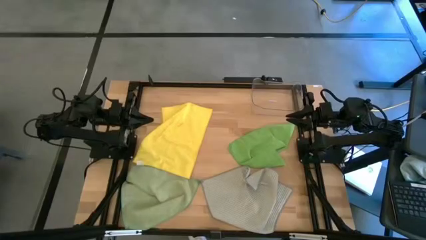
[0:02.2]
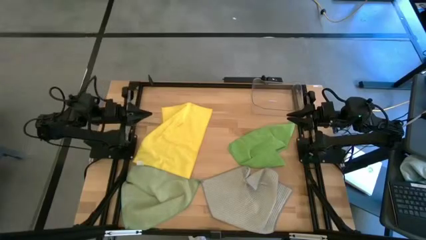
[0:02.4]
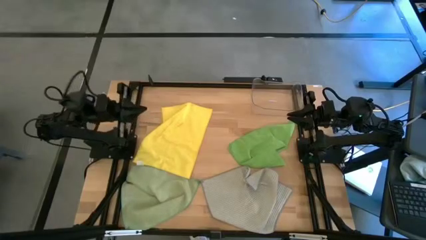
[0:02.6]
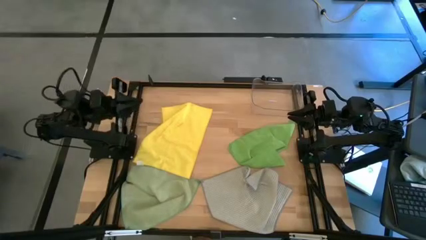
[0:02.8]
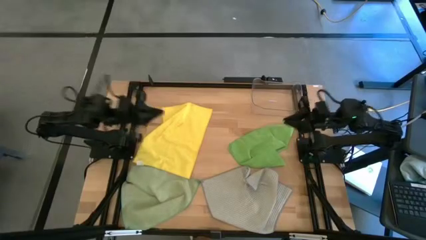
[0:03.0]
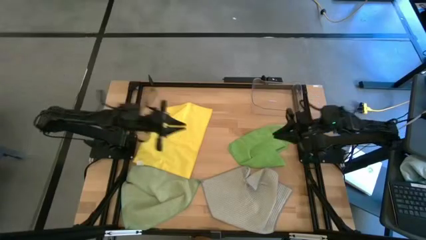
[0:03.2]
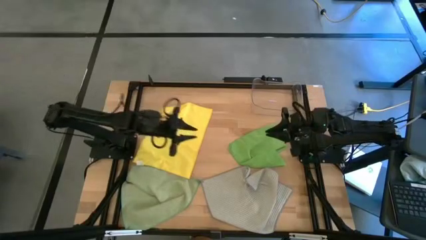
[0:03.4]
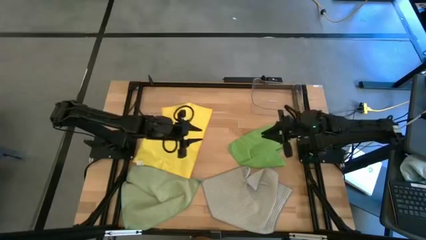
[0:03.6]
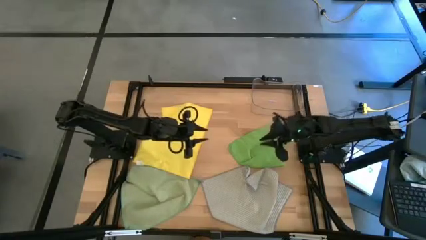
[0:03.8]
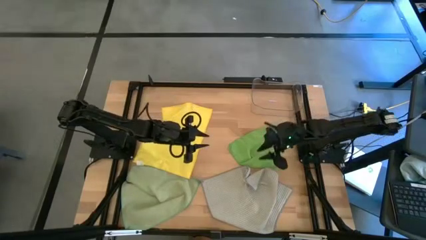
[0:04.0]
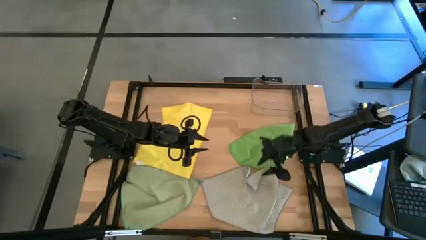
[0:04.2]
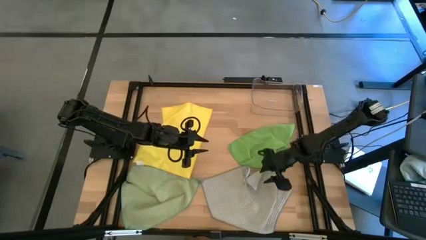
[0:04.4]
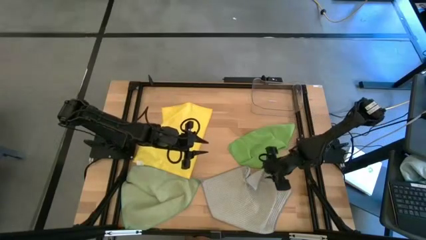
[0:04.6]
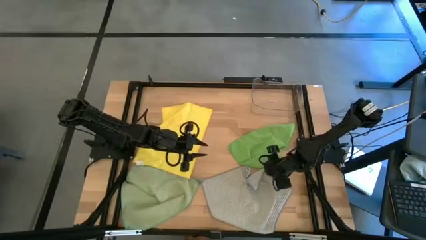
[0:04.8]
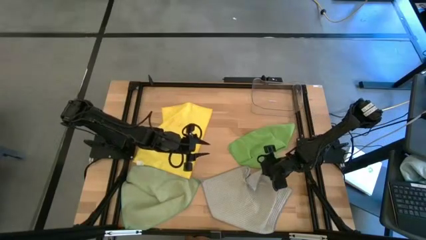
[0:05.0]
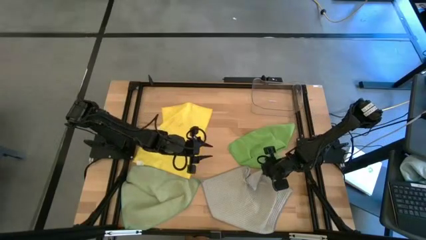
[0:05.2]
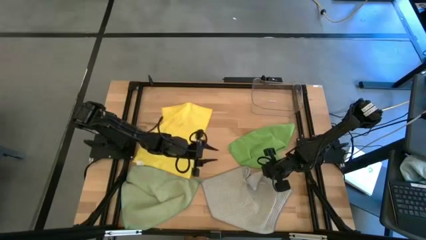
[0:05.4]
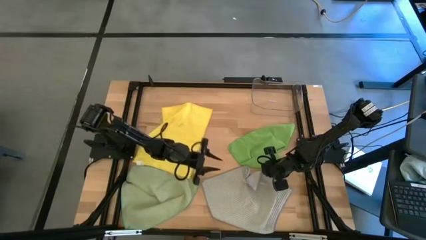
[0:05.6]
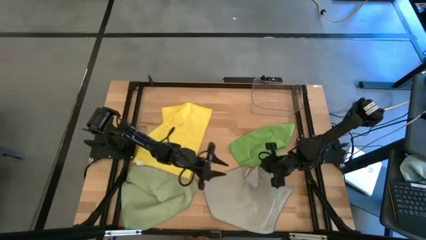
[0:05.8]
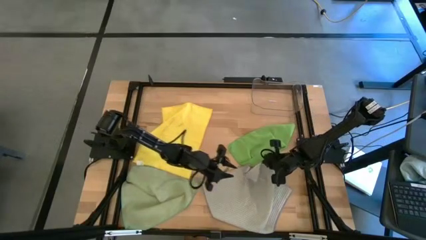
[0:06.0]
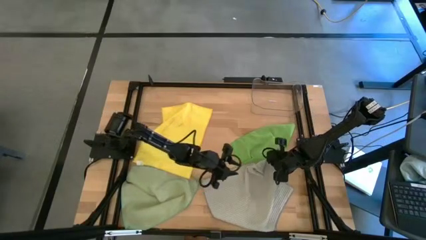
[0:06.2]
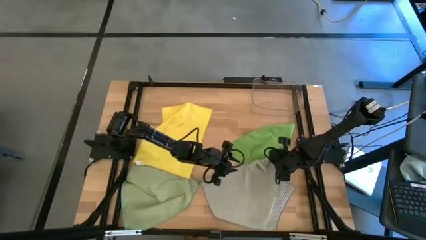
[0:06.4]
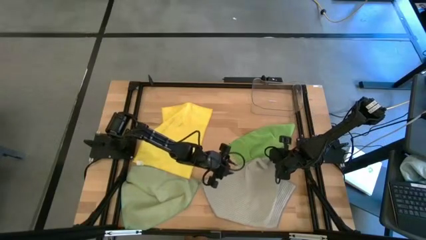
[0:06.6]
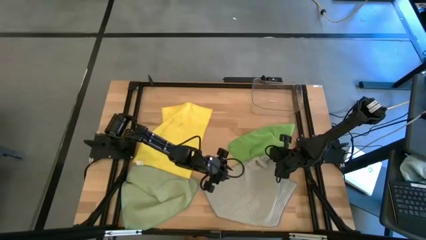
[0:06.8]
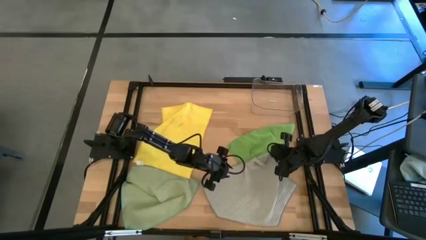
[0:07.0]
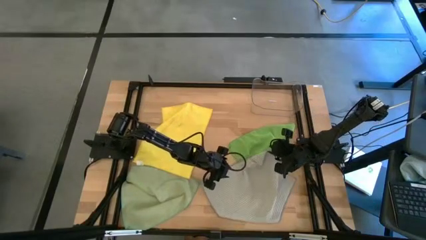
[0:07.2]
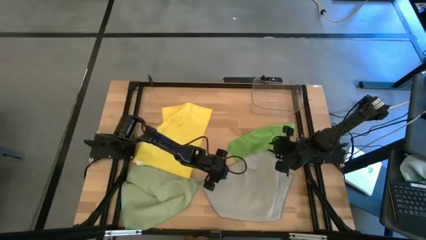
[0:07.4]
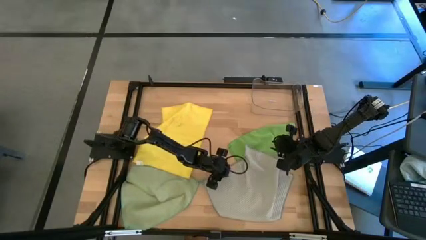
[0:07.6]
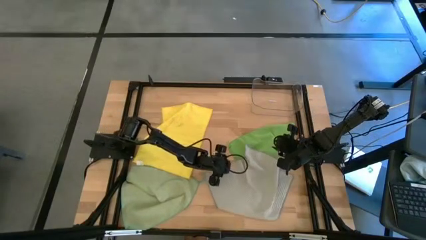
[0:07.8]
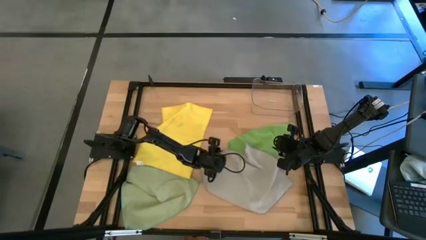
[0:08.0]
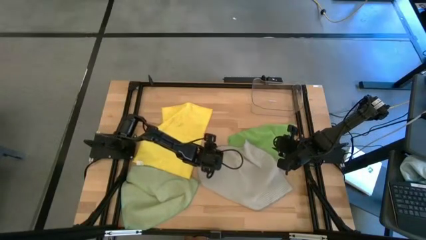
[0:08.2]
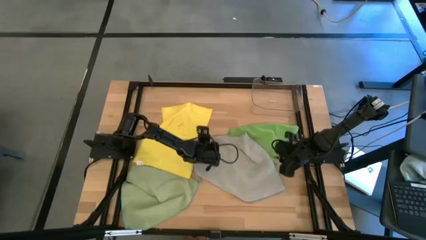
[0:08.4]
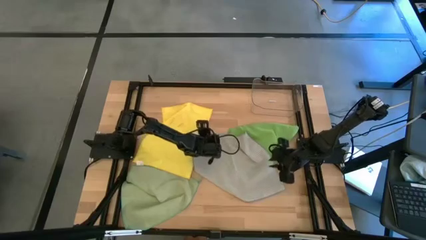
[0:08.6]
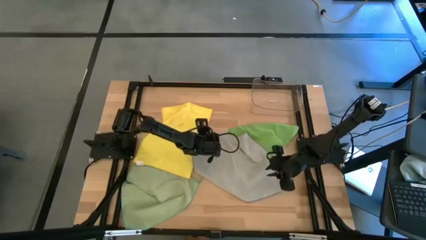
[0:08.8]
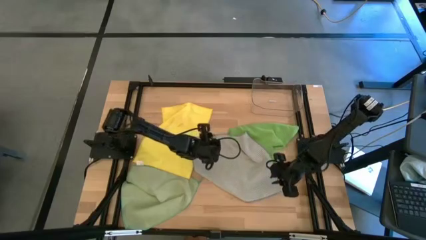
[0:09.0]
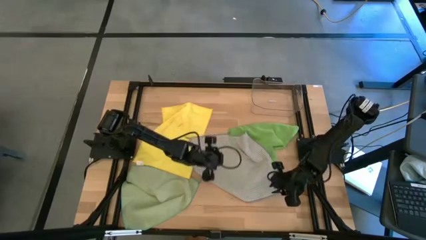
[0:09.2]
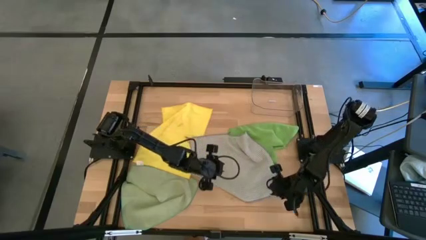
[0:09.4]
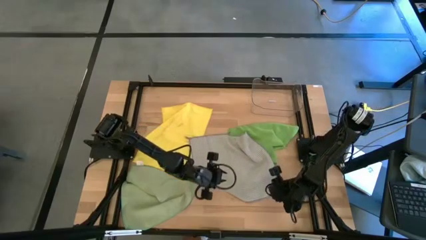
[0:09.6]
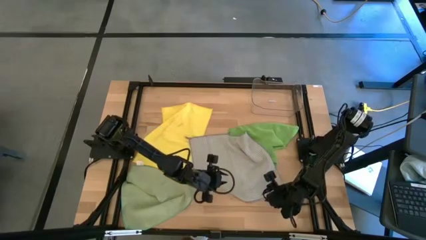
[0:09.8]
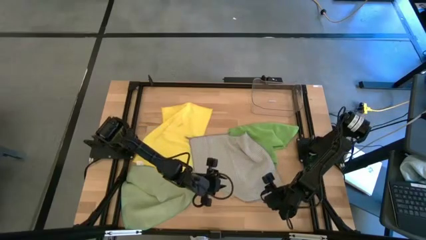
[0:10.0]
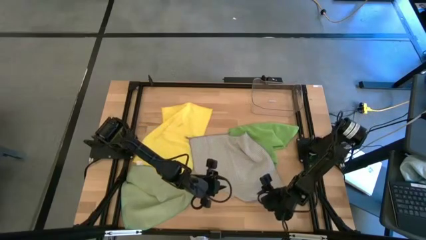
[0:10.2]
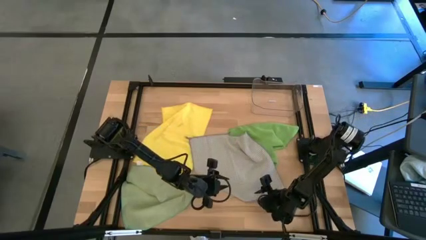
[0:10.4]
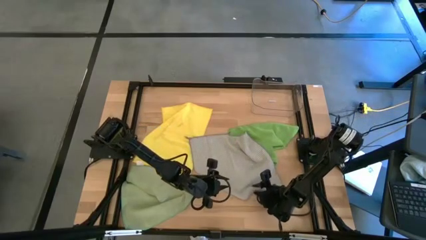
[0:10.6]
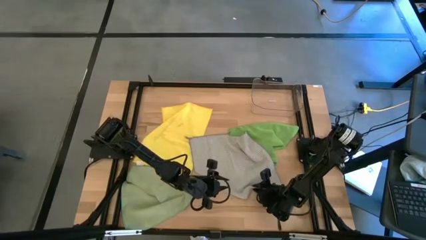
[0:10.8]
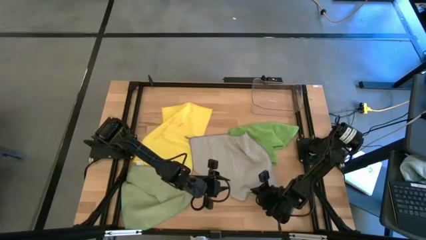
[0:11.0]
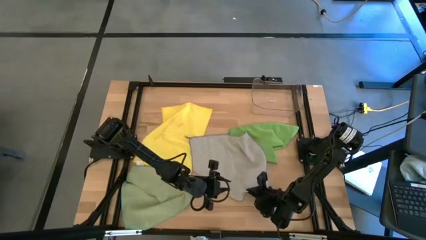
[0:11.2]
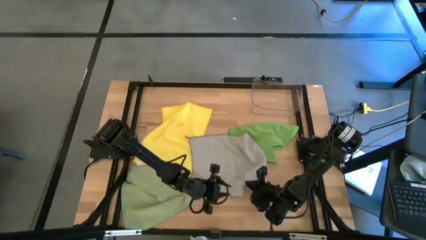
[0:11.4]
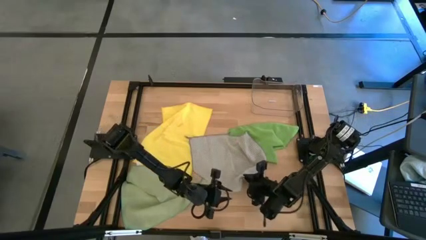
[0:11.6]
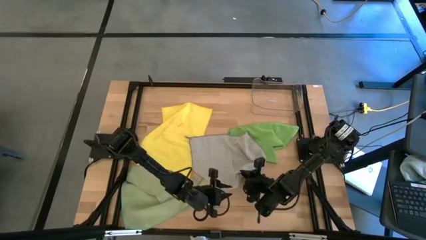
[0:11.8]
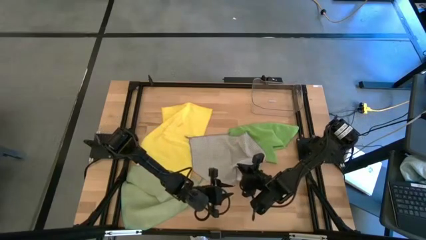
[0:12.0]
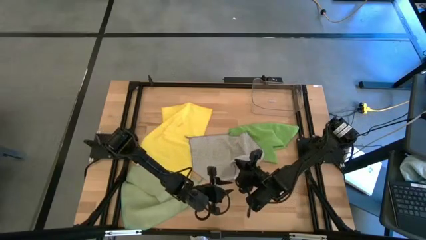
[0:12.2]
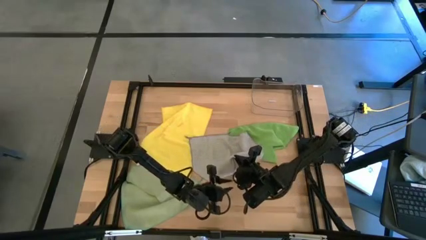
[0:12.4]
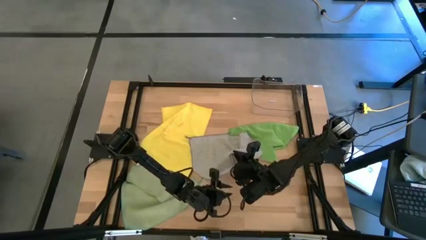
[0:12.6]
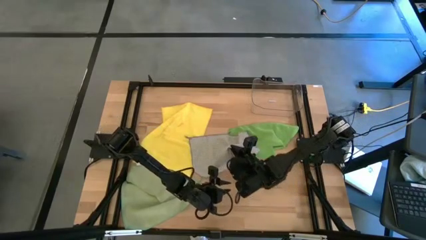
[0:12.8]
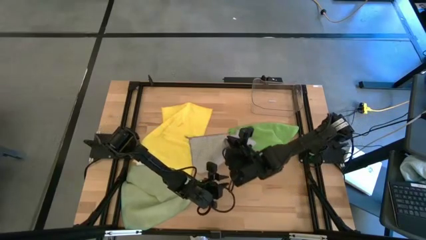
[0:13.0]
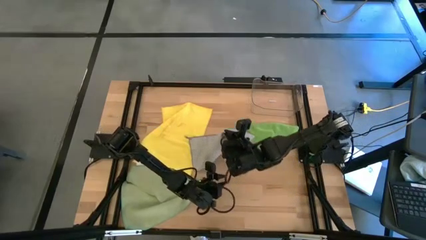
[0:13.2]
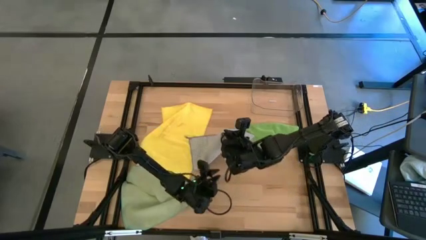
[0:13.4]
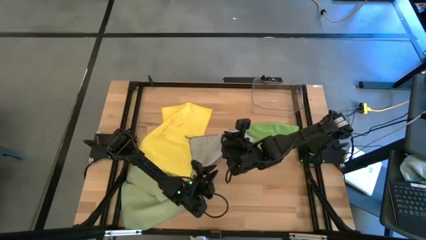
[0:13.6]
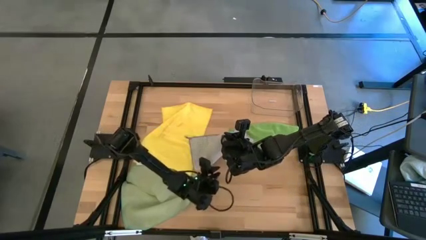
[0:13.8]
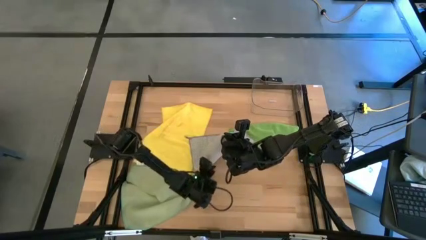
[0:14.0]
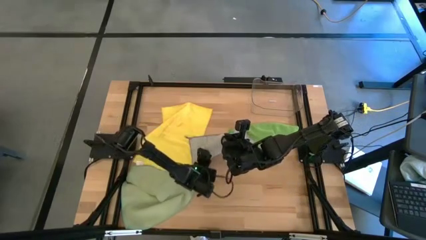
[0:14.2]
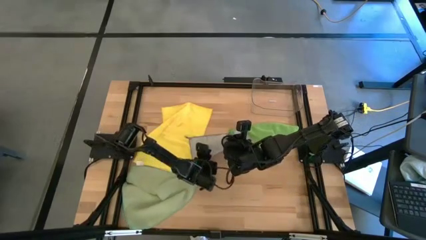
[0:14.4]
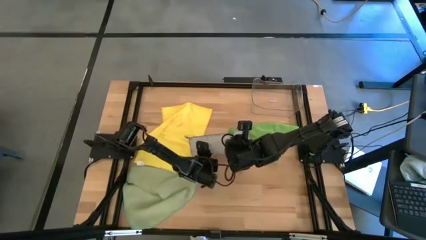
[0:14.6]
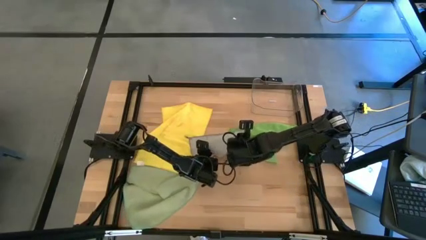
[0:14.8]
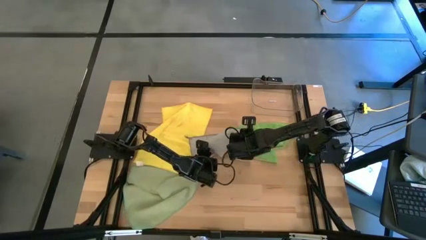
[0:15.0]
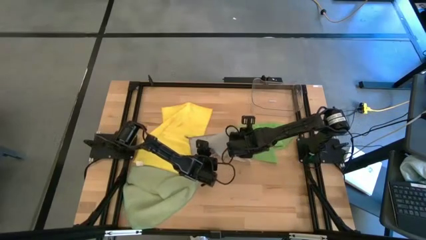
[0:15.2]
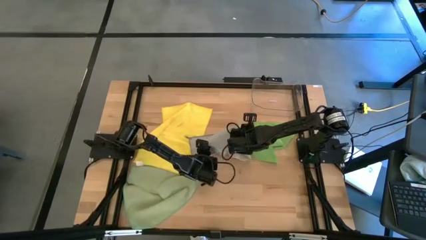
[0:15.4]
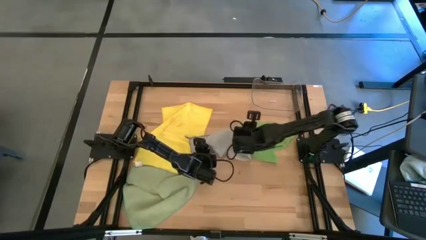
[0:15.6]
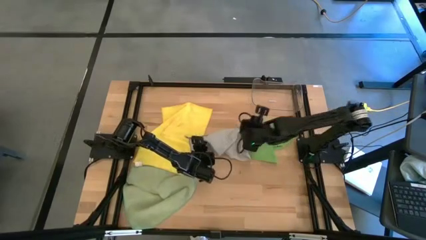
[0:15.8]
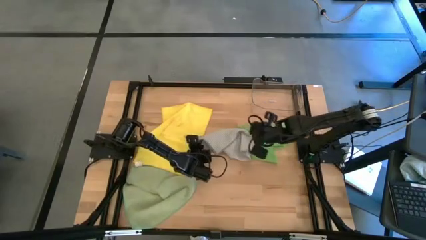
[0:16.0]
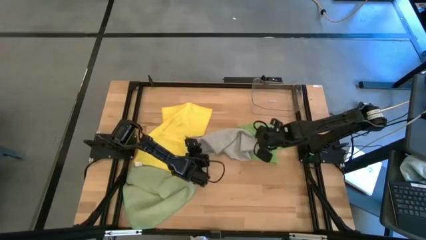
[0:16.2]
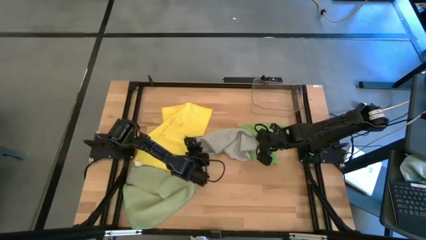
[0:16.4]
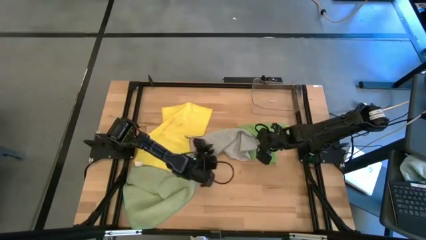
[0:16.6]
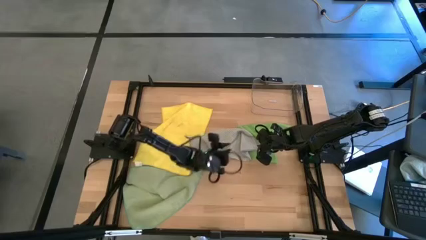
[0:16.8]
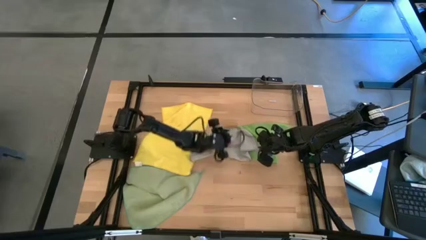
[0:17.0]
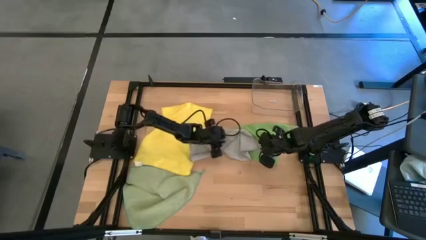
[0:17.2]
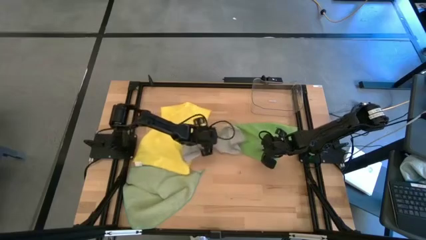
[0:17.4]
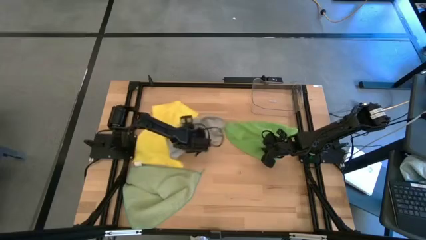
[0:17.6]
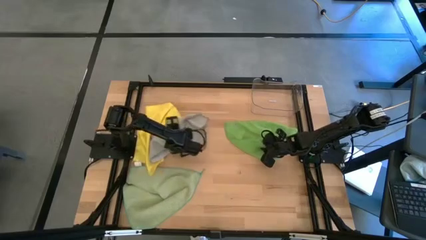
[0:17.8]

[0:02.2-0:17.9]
Task: Fold microfiber towels
Adjust the gray cloth

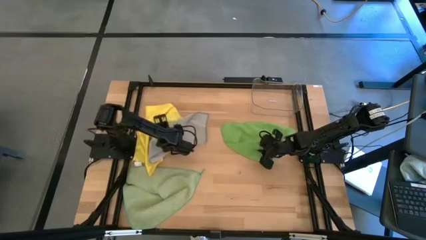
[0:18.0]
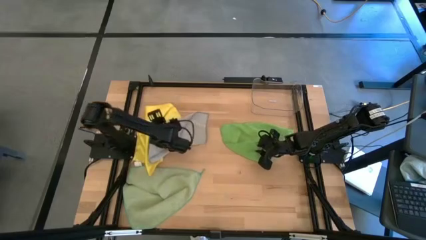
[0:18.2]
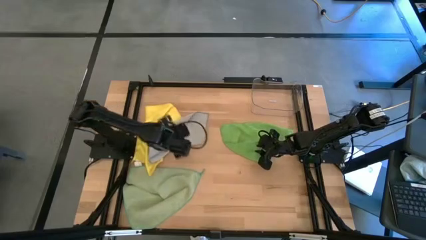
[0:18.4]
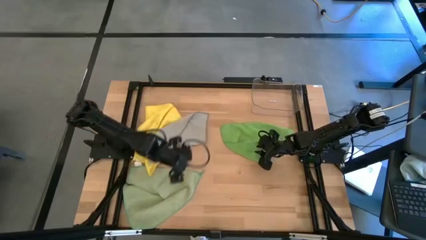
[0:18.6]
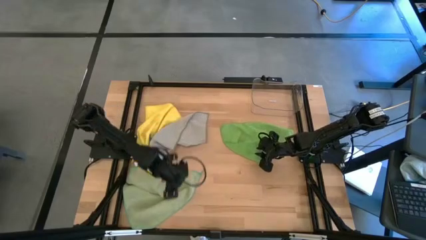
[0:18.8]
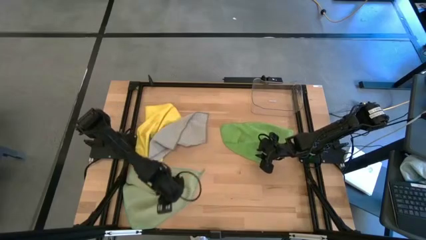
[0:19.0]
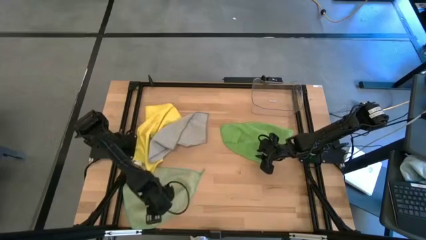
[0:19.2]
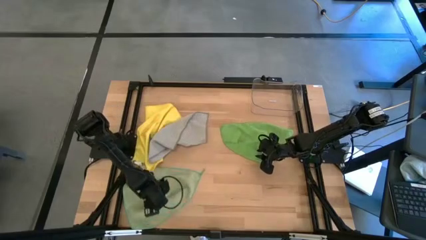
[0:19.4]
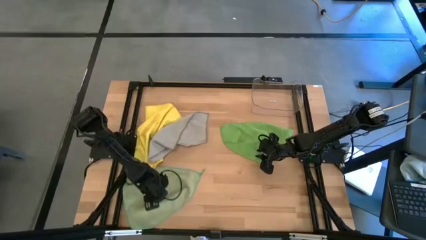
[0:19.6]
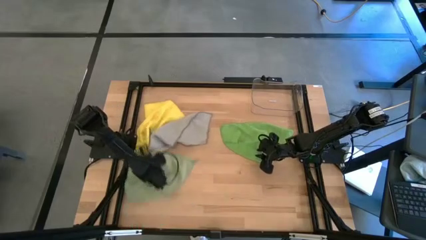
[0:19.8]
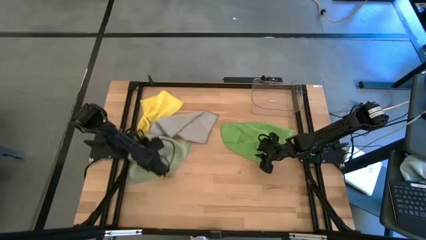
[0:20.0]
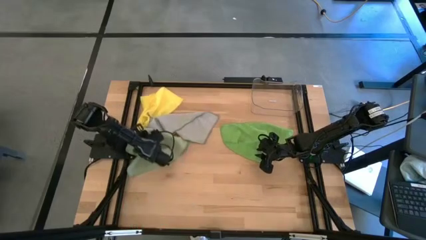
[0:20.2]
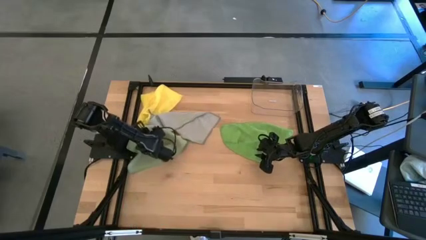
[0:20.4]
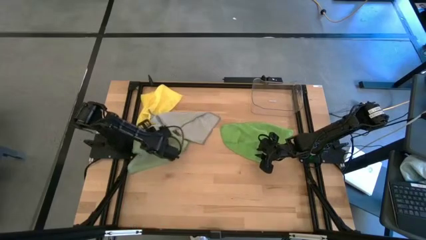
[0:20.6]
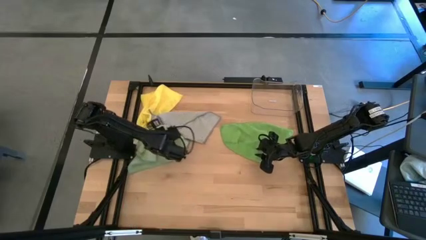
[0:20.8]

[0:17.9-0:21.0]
Adjust the light green cloth
